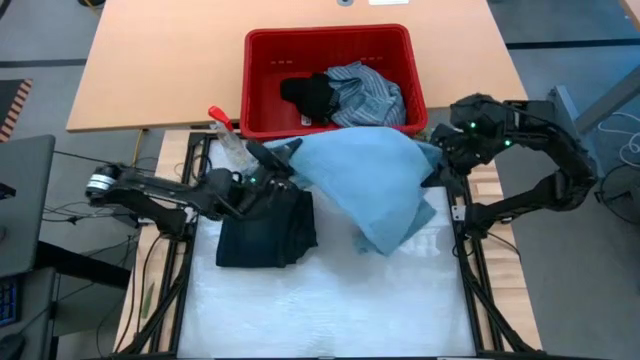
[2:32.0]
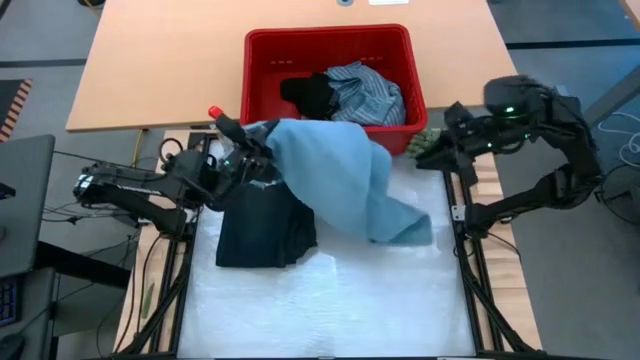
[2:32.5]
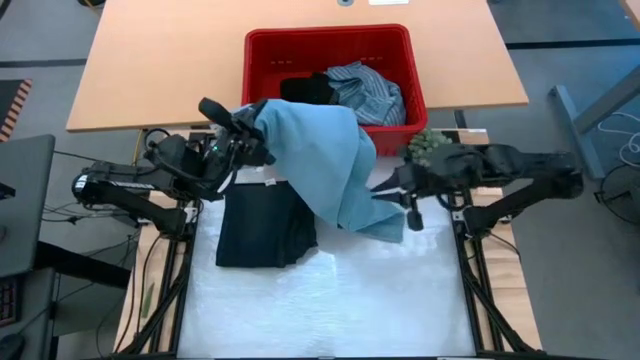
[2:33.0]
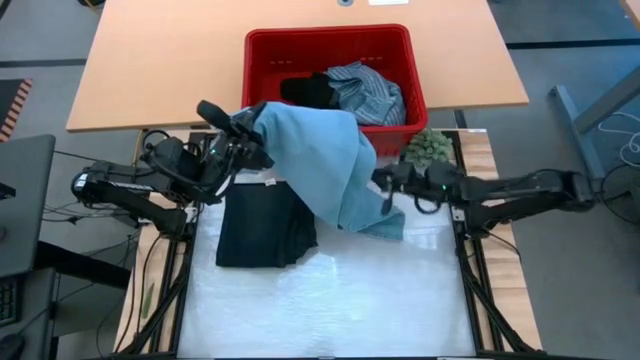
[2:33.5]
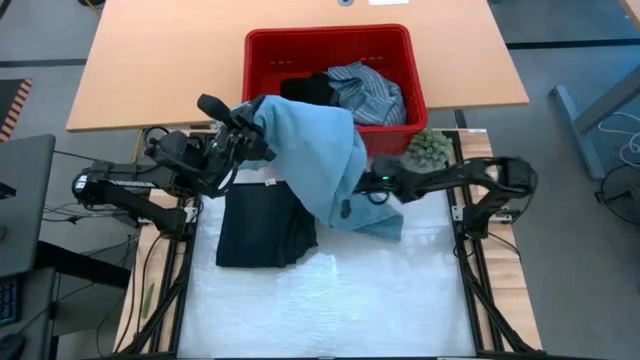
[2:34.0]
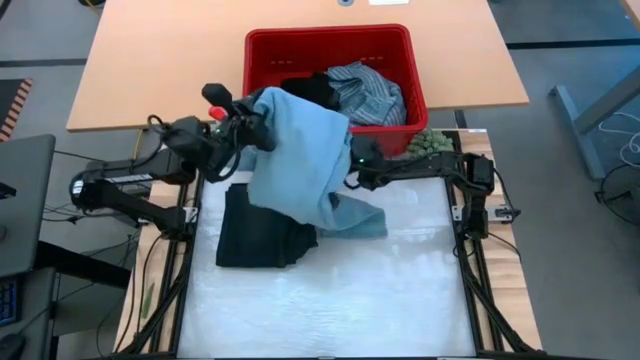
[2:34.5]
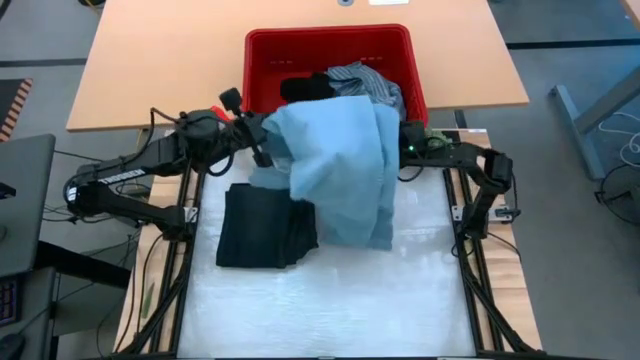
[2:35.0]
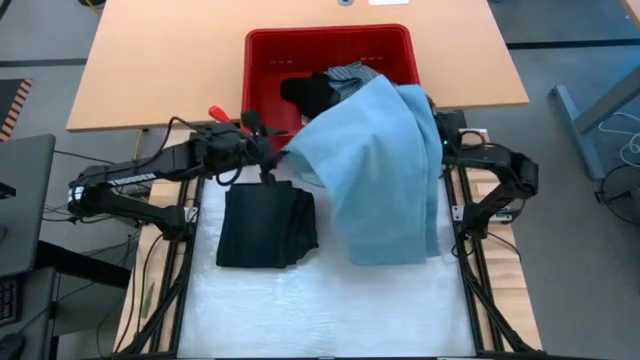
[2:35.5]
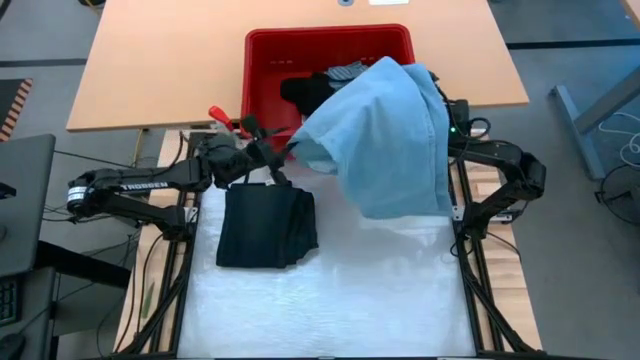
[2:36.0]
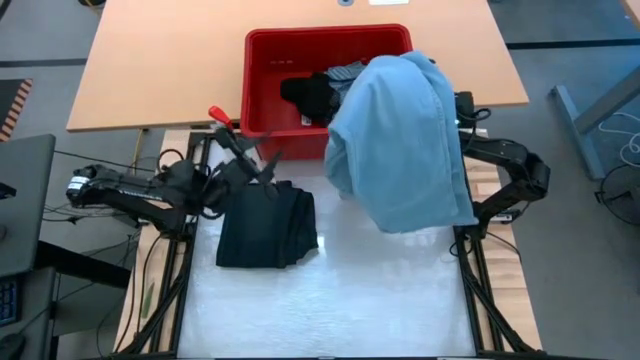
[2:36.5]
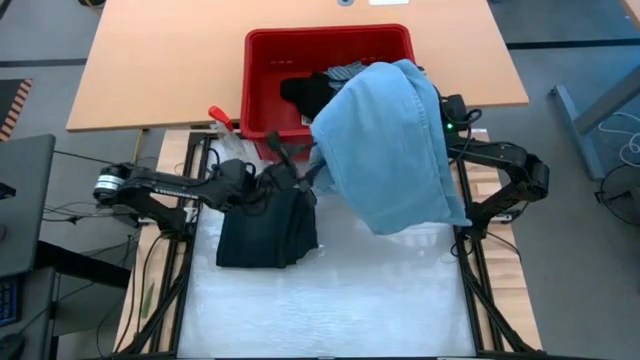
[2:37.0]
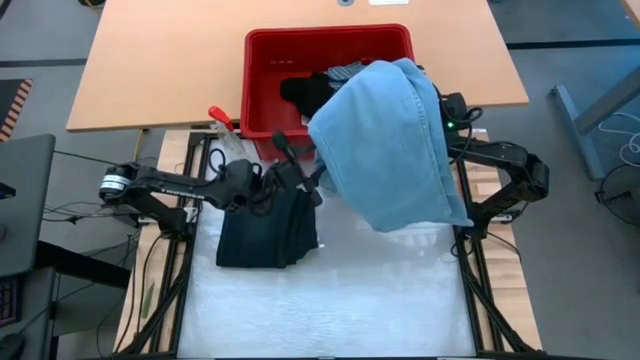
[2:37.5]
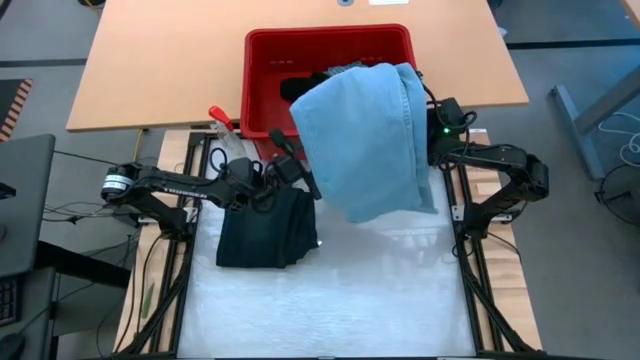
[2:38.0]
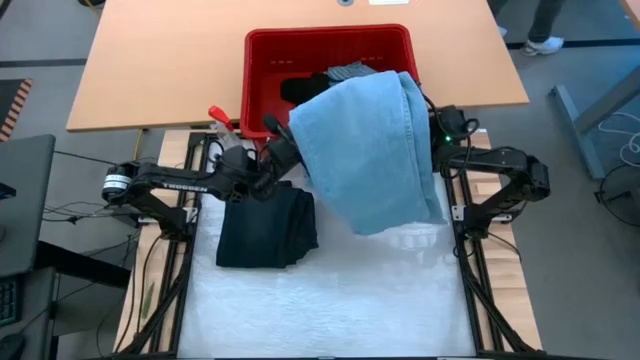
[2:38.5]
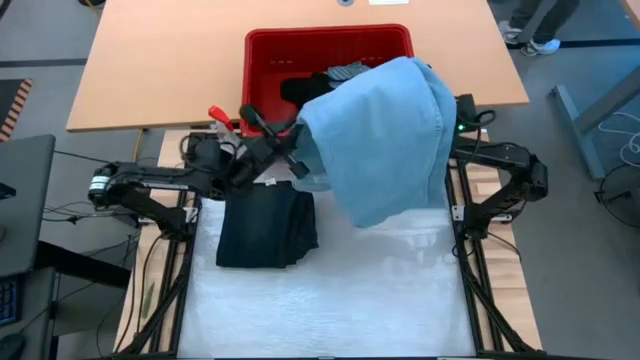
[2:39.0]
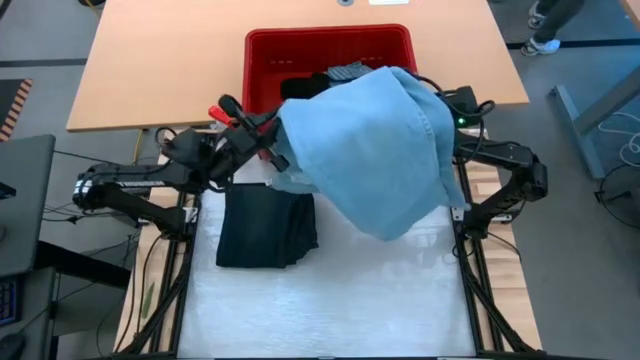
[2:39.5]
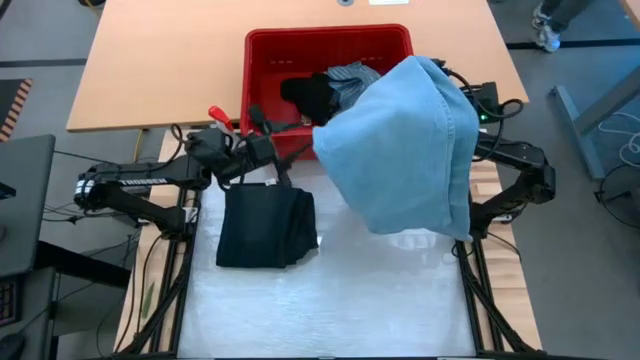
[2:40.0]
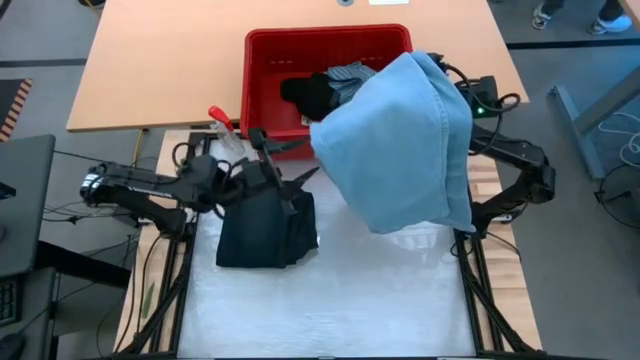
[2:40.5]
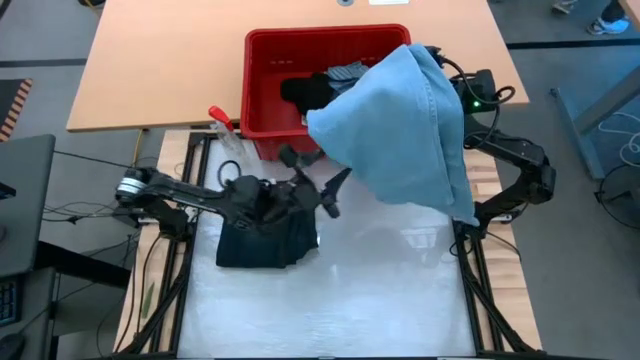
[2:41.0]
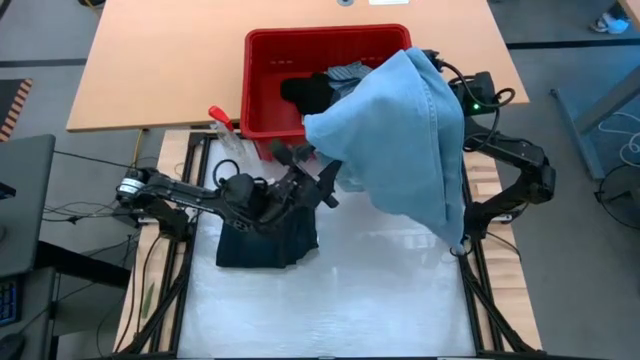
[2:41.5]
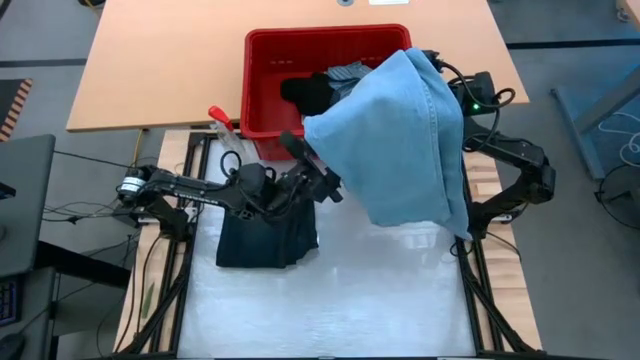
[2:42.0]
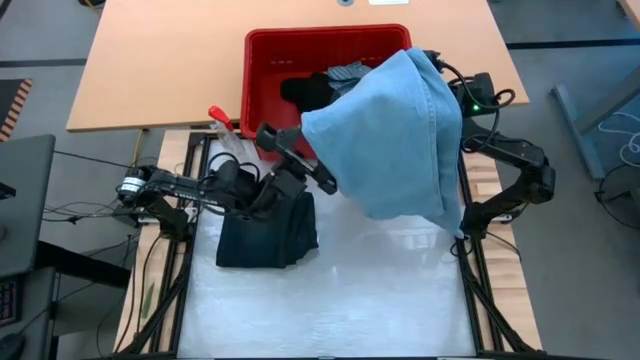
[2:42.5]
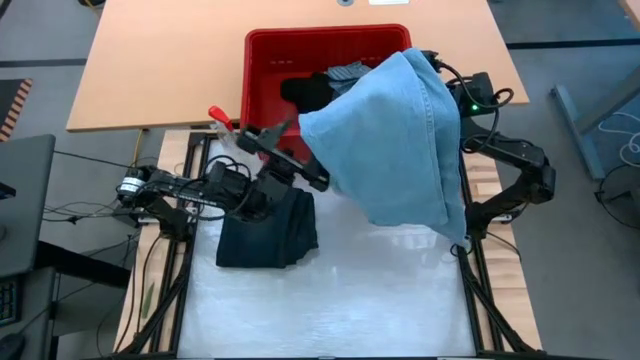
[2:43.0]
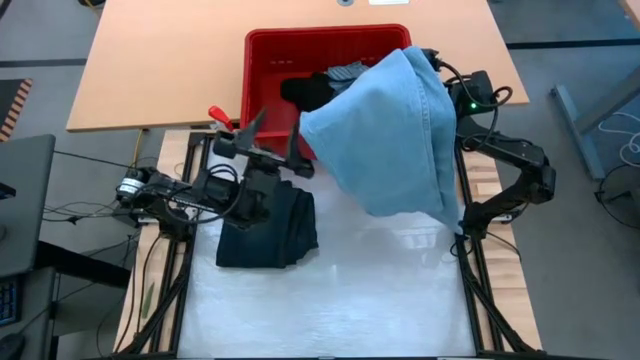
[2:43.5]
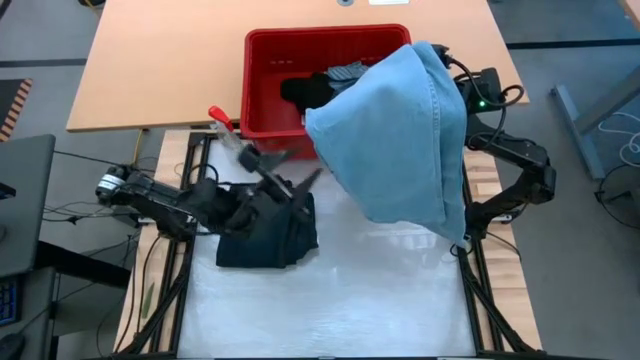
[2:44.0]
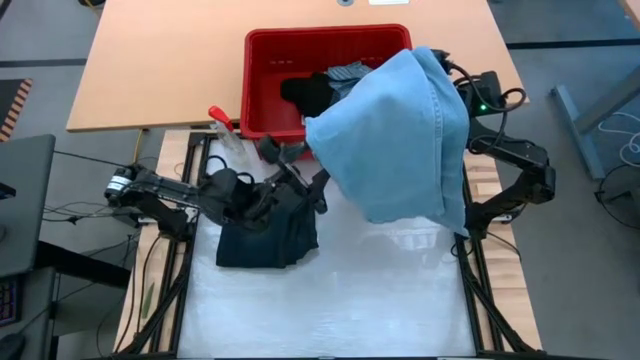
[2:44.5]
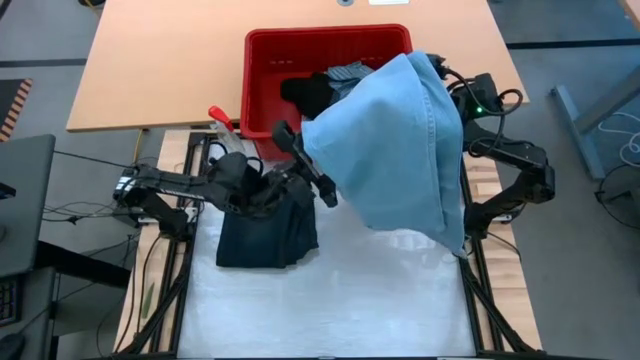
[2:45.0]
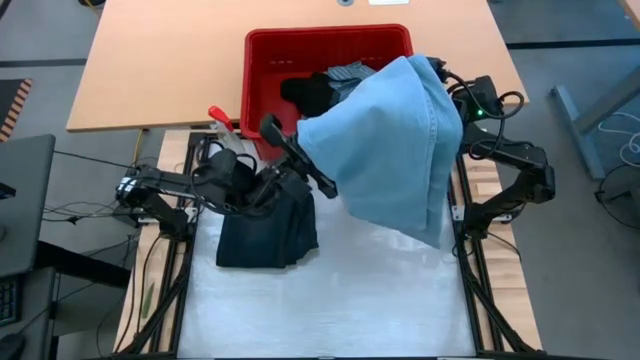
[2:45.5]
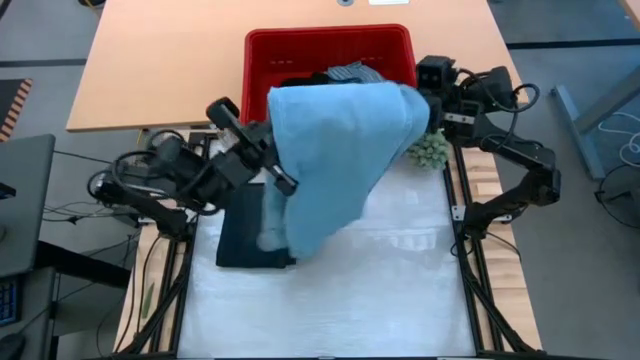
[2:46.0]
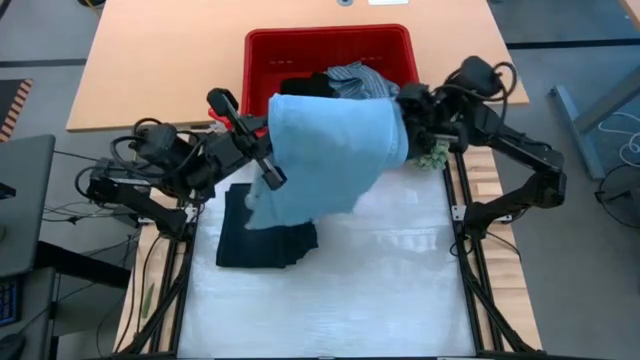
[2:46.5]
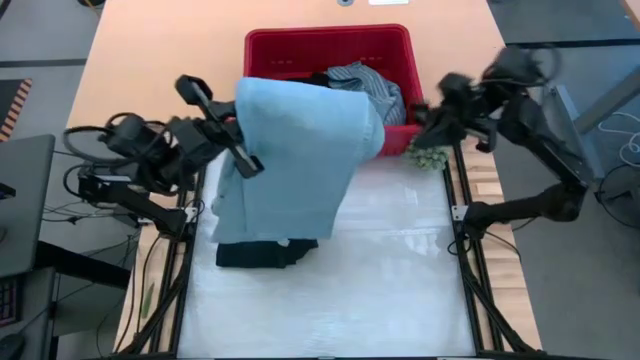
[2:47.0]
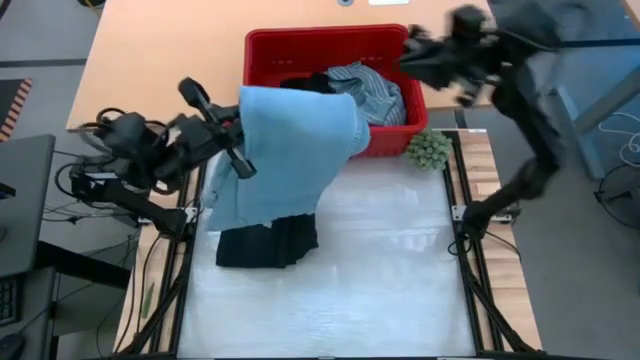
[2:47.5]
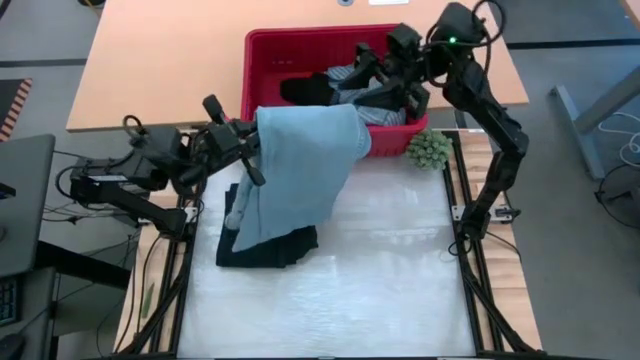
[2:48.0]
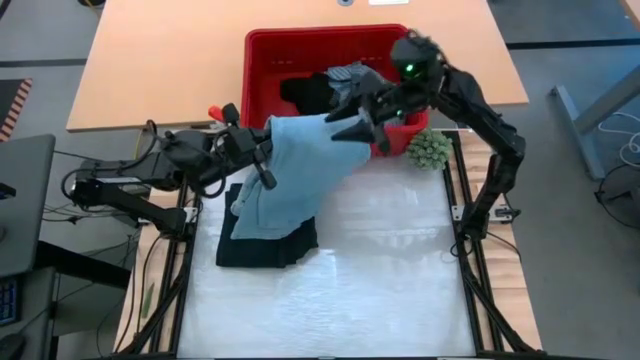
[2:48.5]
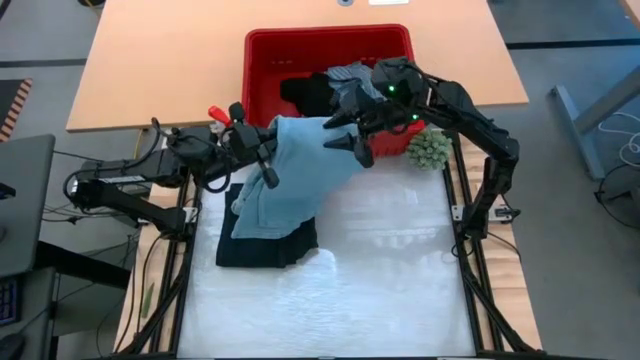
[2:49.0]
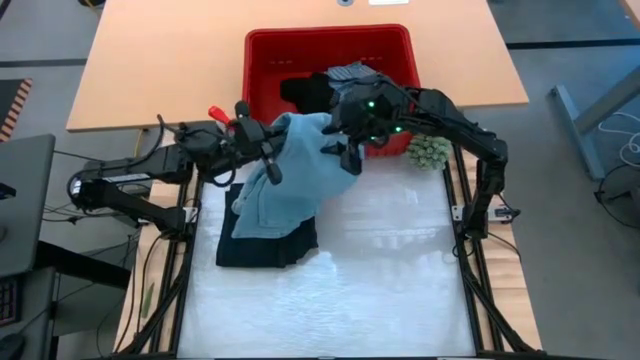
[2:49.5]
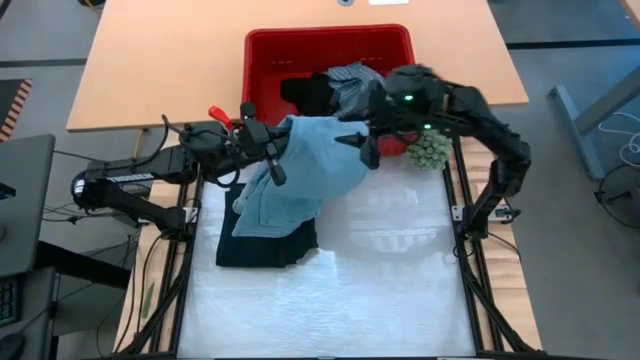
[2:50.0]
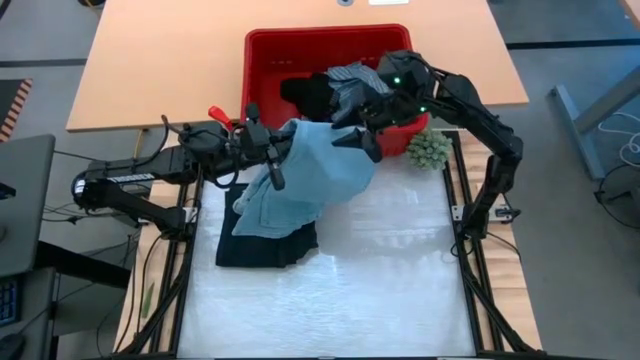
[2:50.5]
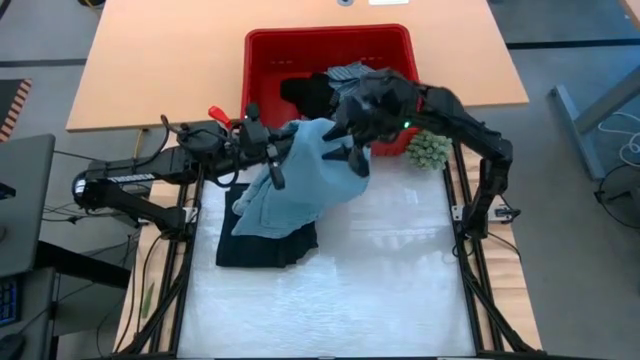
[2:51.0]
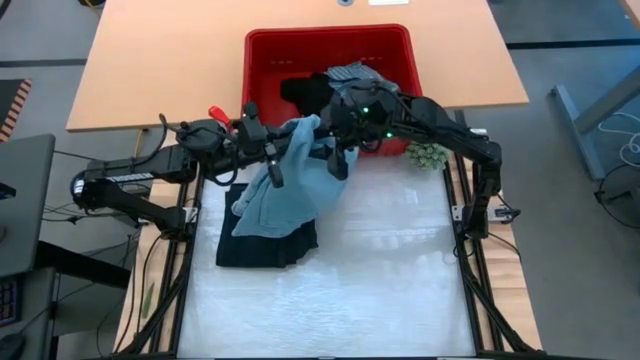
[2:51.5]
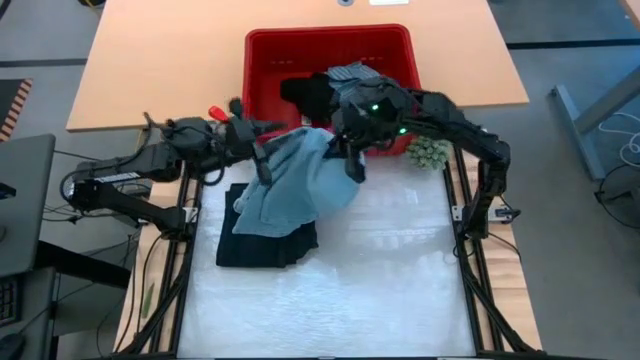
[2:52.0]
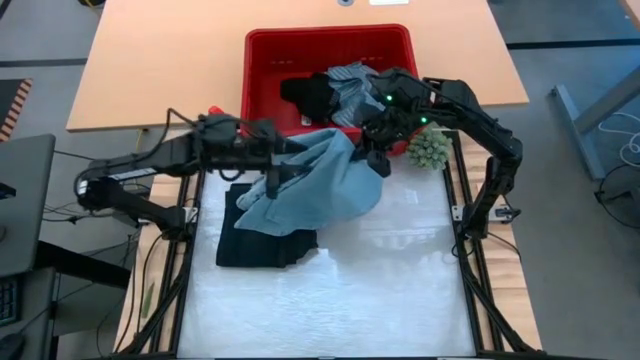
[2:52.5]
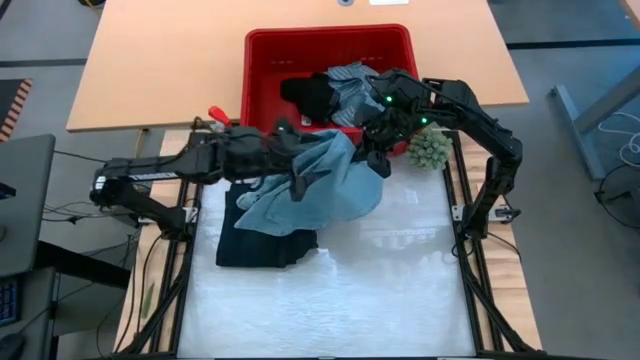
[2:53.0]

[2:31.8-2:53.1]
Task: Fold Laundry from Bin
Fold the light blue pants
